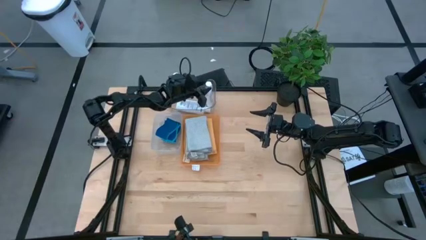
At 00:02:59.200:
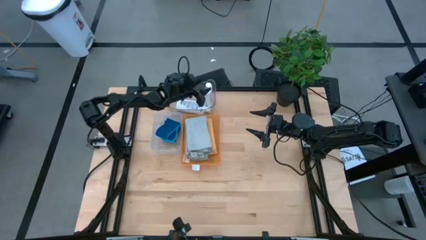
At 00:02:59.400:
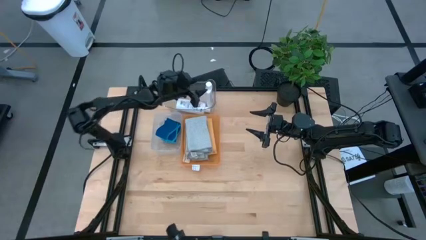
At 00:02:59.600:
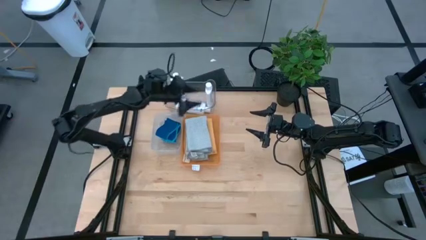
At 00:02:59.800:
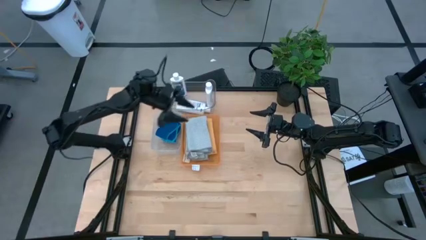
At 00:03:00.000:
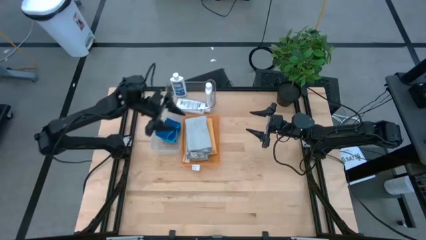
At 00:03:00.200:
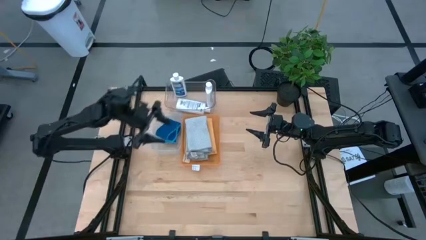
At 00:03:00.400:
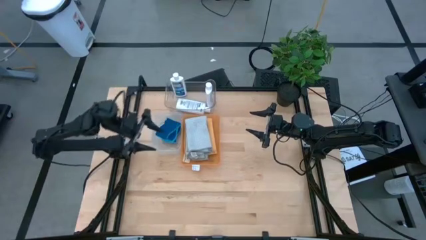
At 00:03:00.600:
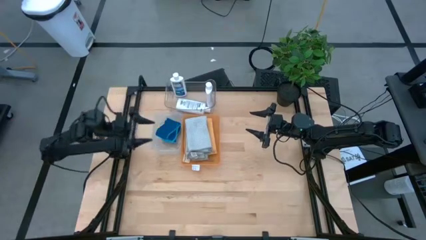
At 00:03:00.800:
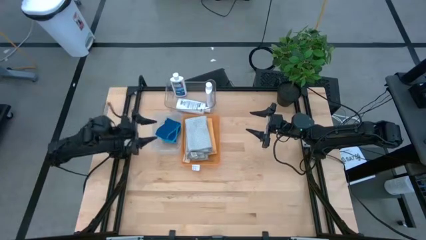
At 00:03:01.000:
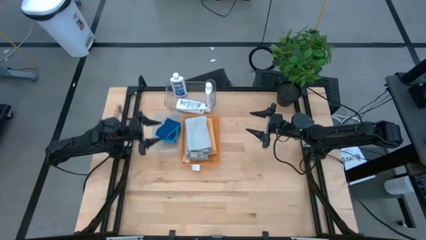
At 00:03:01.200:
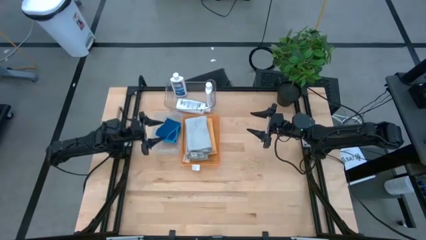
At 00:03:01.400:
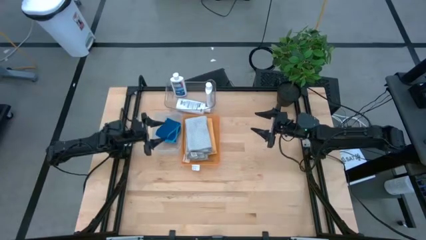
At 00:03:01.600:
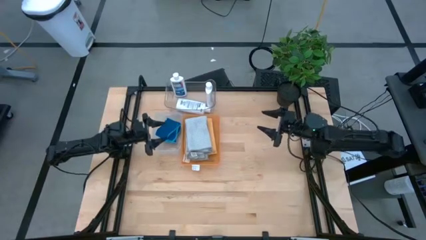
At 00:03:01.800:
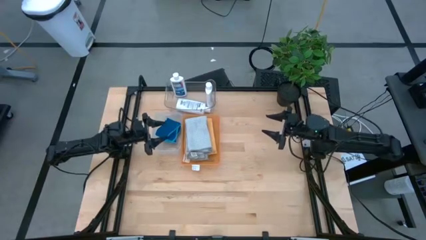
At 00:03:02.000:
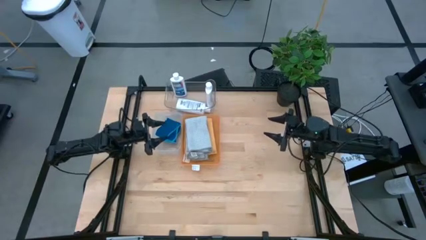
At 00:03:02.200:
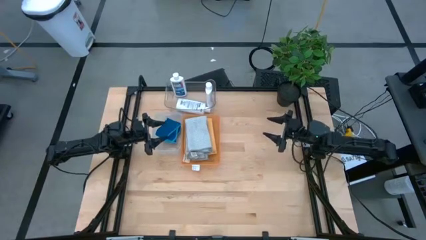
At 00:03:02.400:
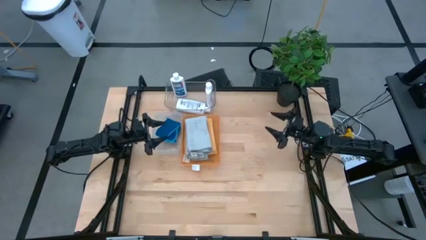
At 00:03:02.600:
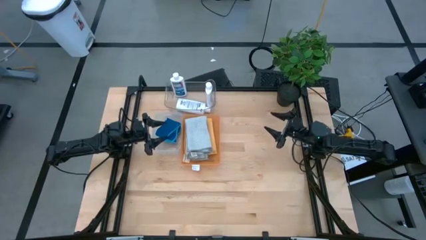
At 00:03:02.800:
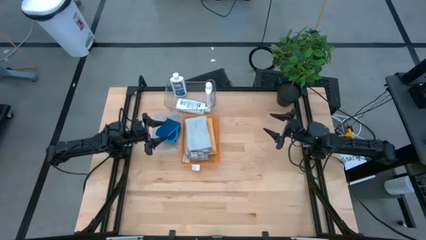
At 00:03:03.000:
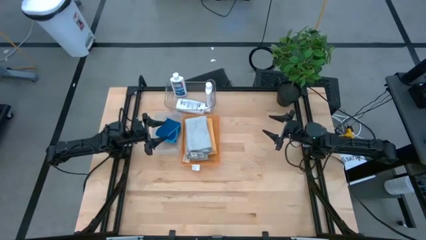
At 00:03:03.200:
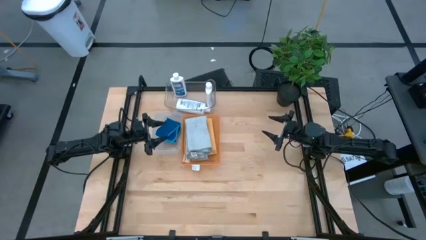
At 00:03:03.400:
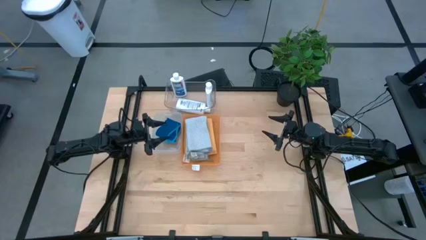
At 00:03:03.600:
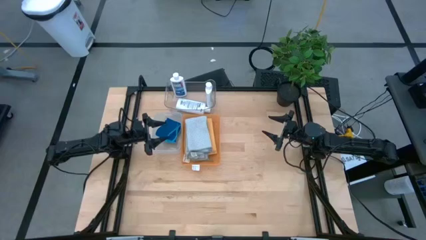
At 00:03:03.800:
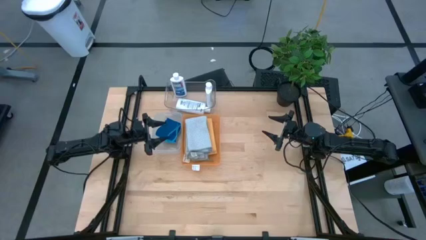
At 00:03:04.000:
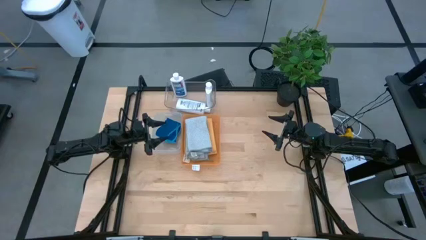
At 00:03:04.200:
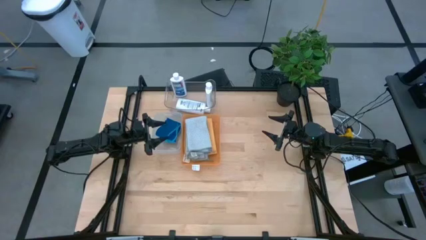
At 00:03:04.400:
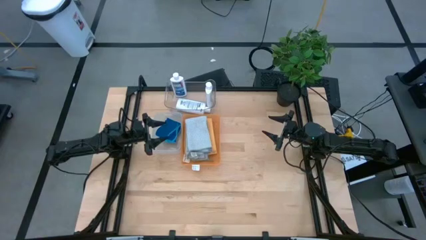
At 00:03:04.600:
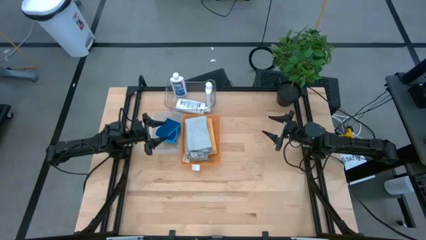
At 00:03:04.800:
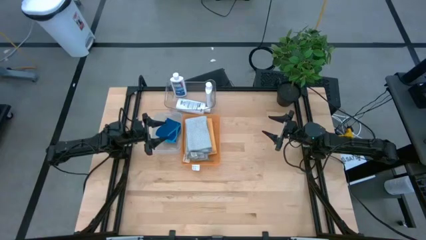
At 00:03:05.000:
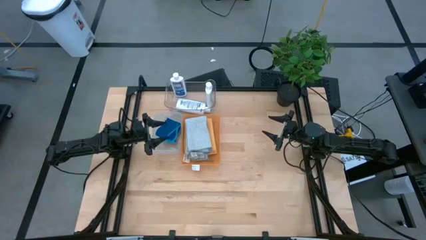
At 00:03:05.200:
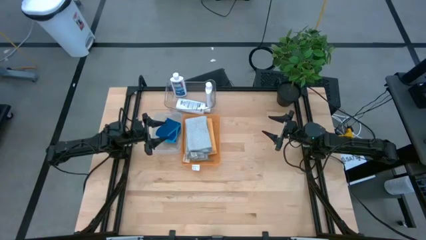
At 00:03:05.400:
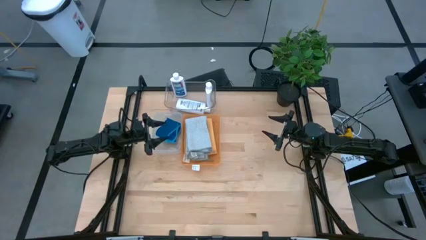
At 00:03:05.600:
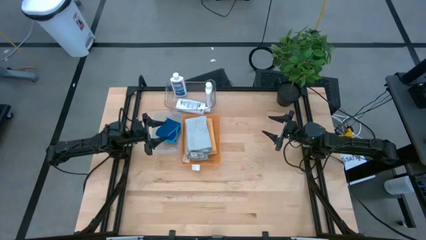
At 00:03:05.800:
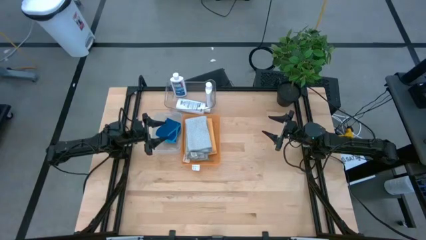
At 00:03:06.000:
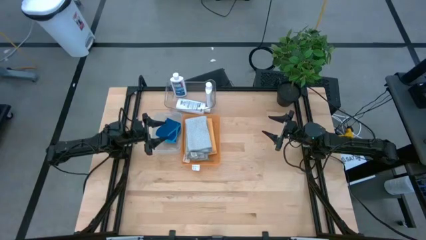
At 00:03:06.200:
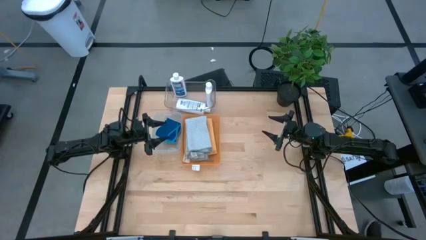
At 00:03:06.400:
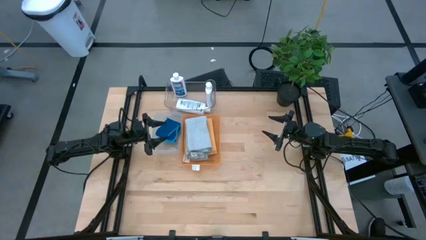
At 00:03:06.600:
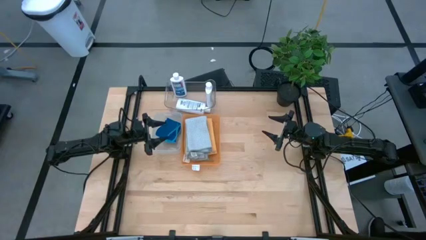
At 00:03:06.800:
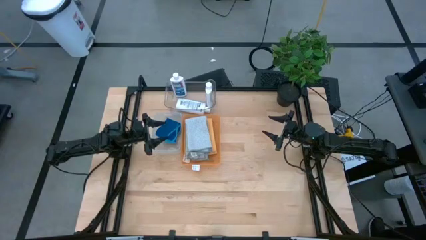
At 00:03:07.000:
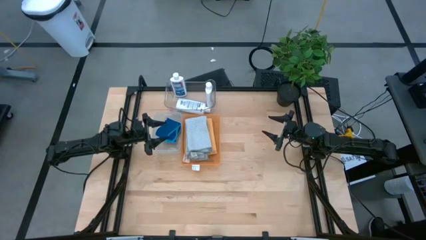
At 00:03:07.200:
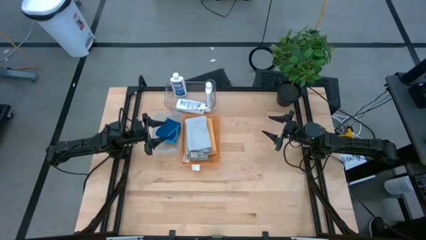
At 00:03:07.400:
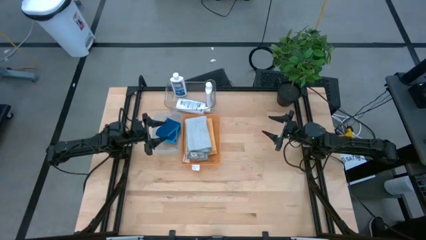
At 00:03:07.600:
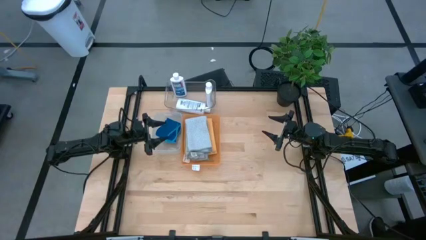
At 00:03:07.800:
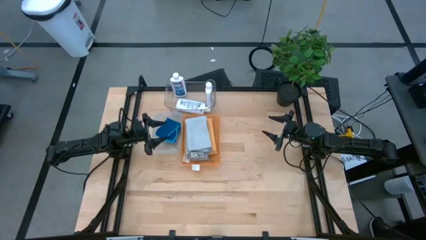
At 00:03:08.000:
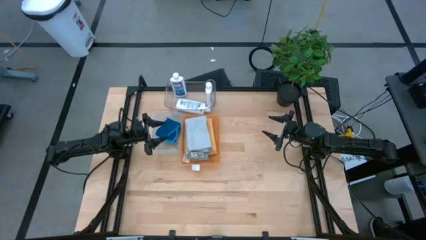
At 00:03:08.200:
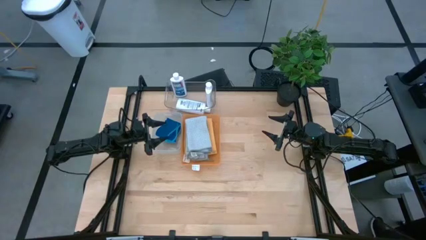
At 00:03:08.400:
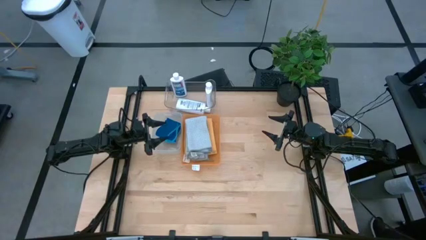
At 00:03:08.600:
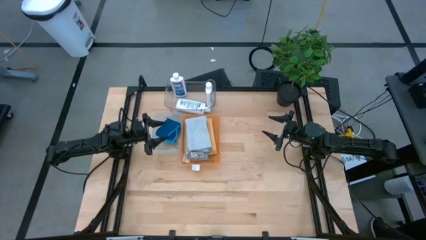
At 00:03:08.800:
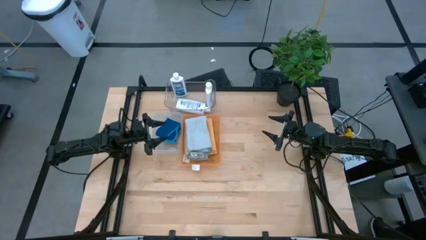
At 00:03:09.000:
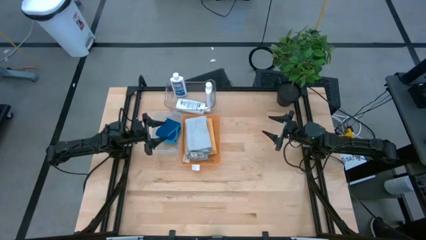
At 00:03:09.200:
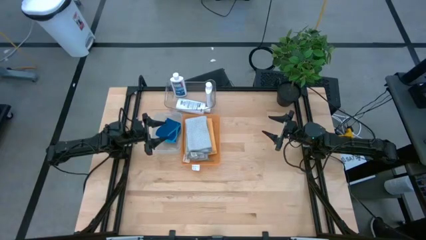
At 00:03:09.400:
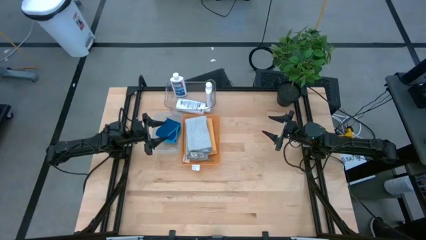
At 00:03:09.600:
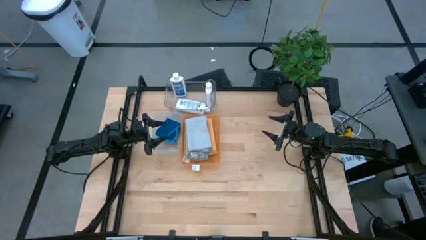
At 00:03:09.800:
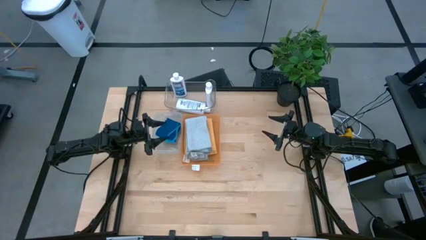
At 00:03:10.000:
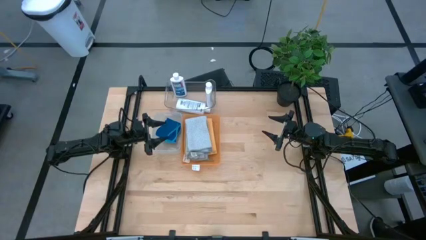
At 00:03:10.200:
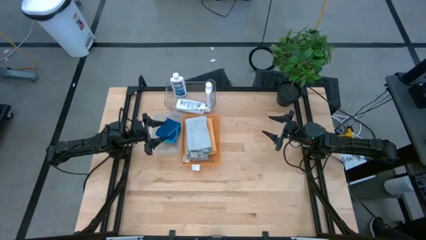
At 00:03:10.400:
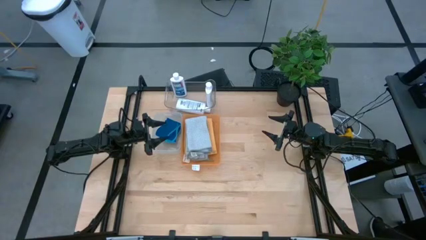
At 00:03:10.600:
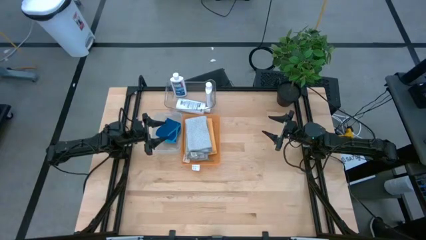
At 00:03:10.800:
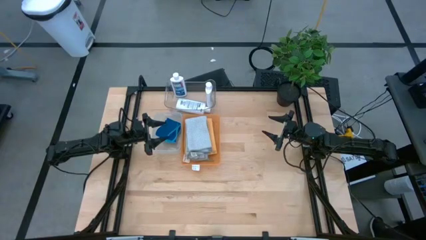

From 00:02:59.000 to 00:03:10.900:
Task: Pick & Place Kitchen Items
Return to Home Position
